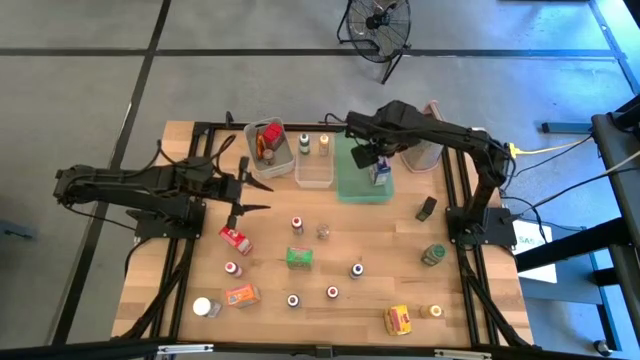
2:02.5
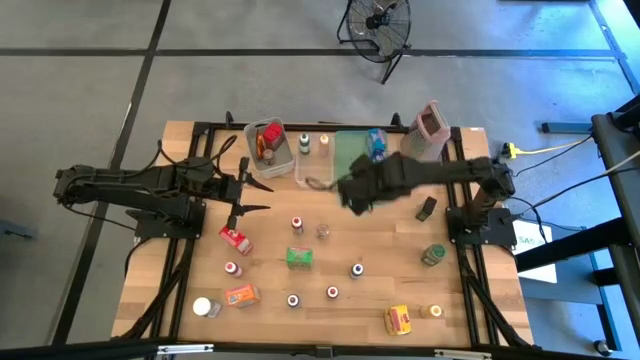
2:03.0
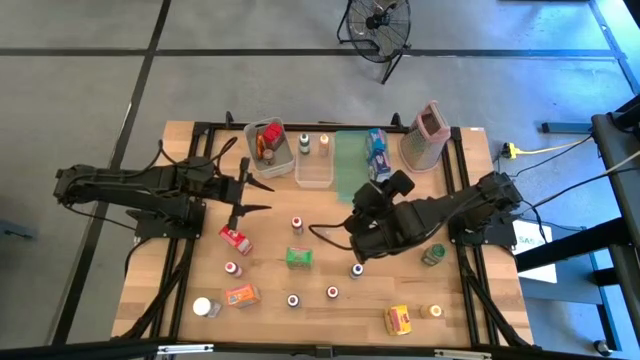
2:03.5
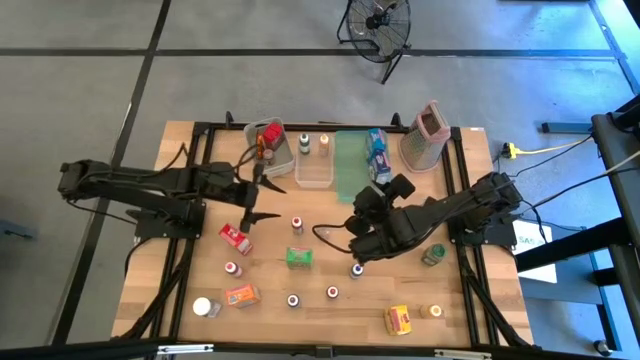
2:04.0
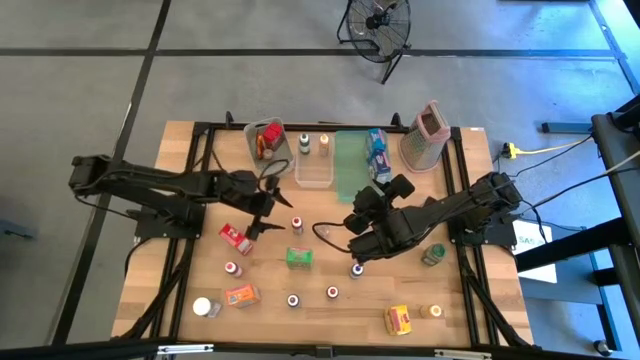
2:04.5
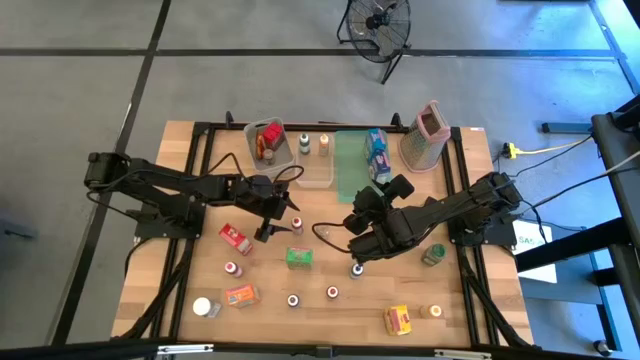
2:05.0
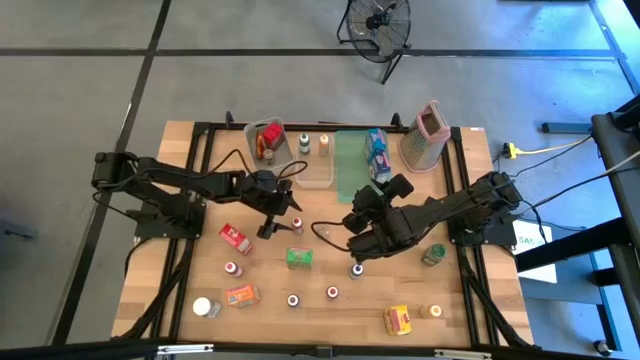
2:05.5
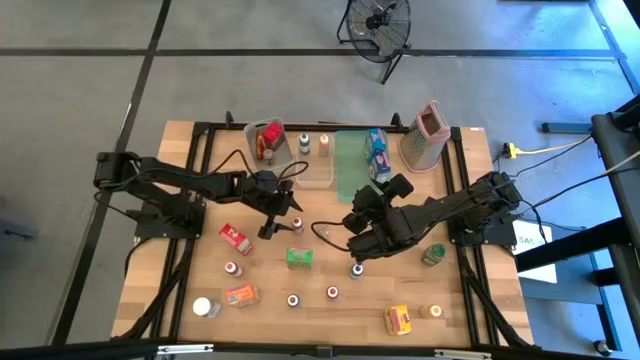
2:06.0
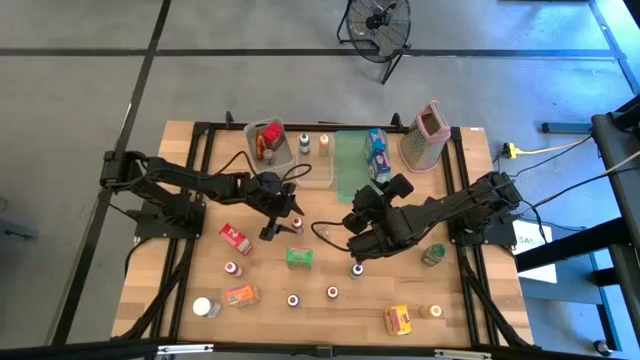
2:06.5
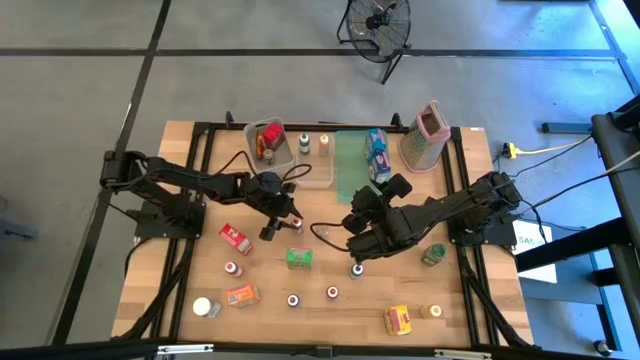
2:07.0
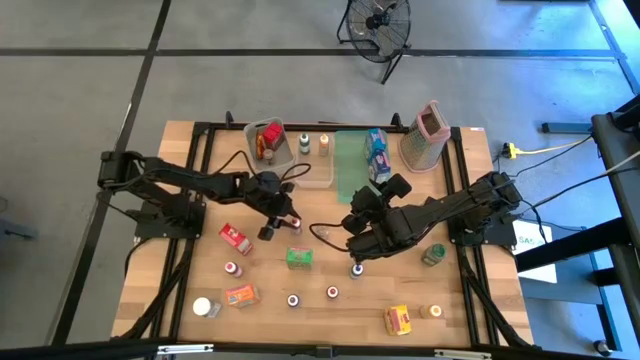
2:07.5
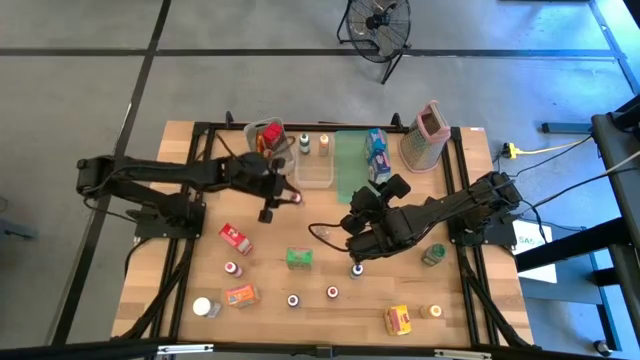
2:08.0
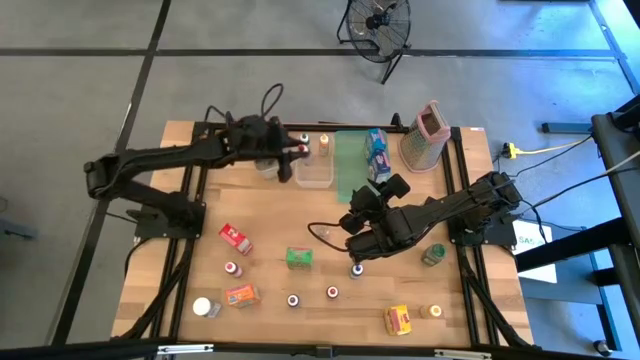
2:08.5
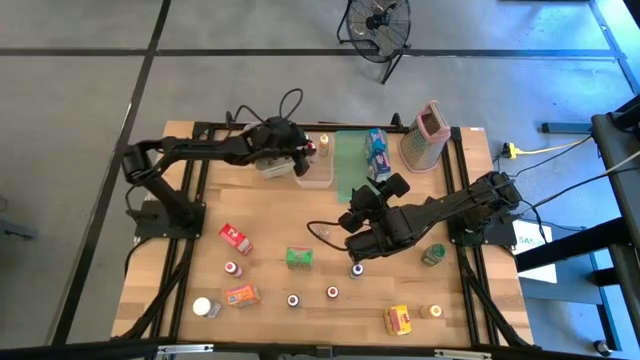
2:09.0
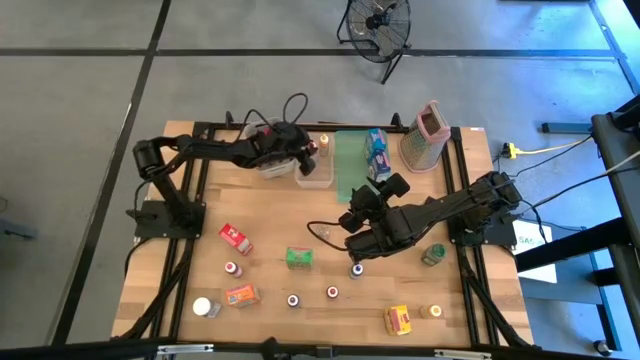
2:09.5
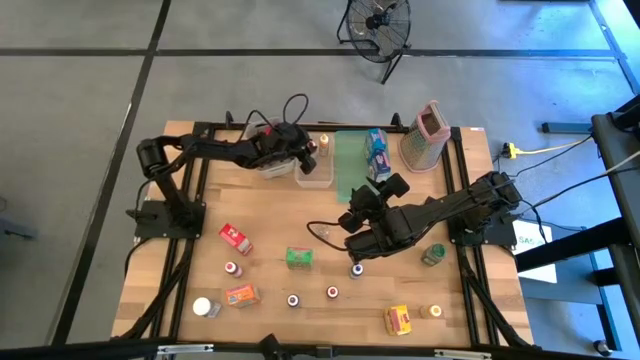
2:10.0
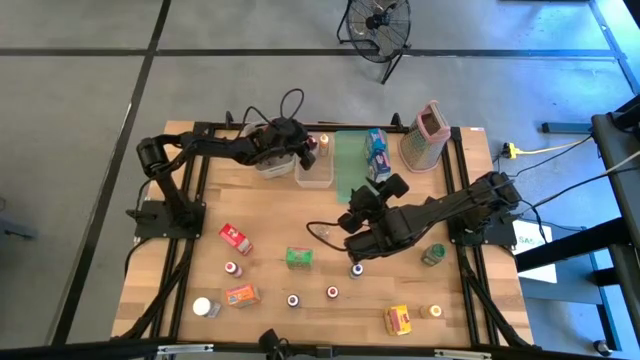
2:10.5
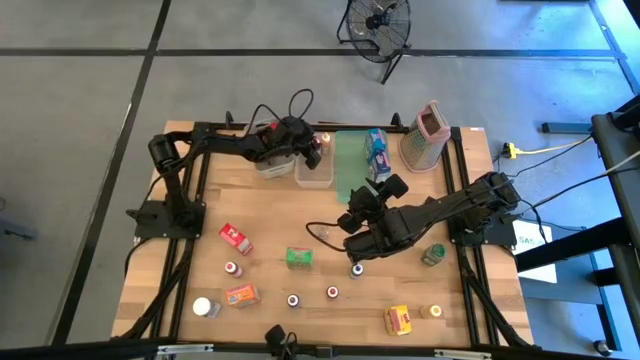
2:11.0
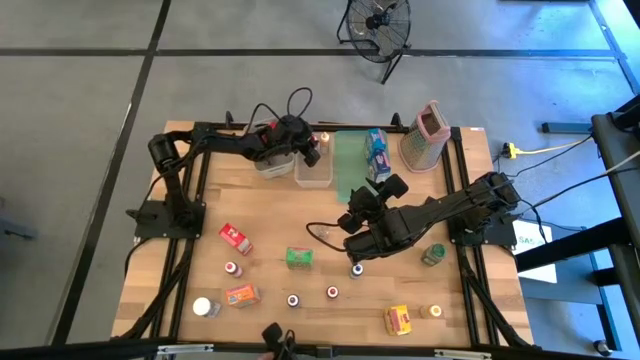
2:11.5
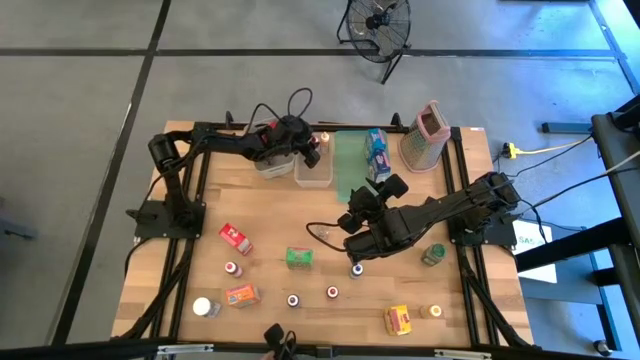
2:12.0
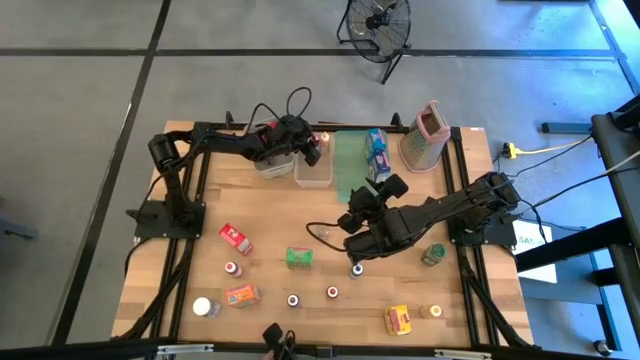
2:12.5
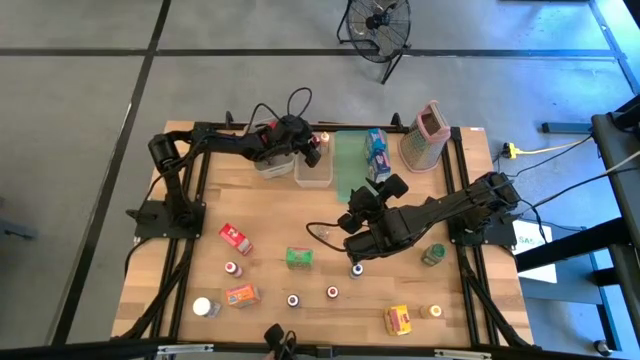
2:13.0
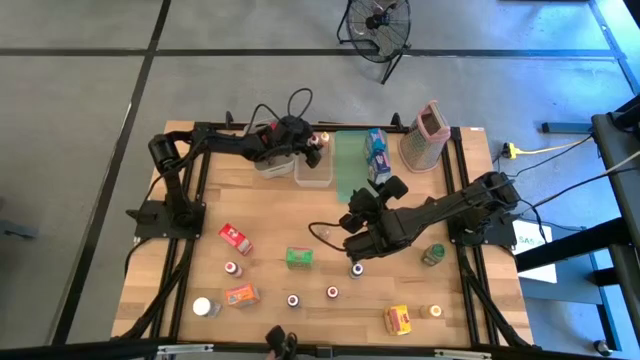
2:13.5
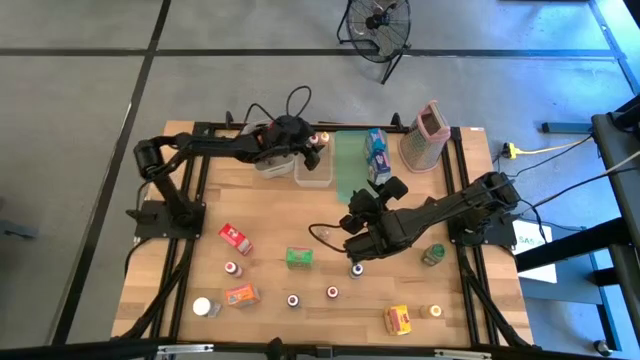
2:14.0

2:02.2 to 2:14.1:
Task: Pick & Place Kitchen Items
Put the top red food coloring bottle into the transparent bin

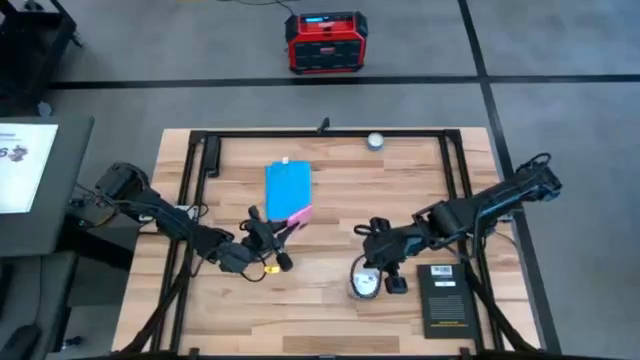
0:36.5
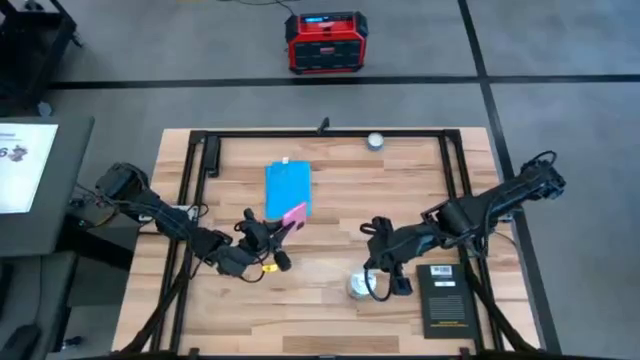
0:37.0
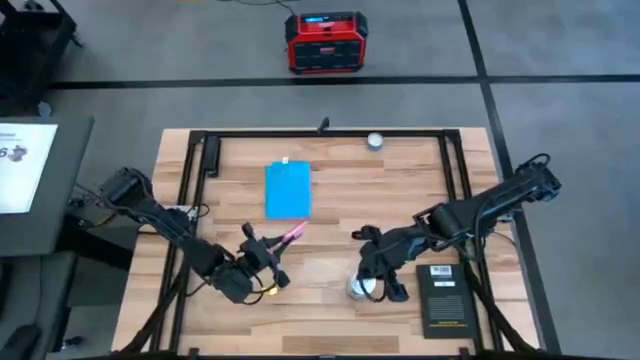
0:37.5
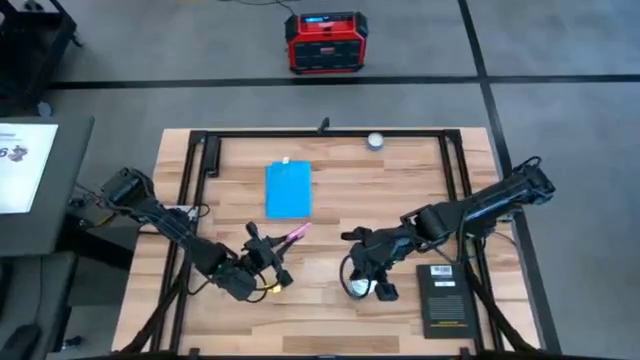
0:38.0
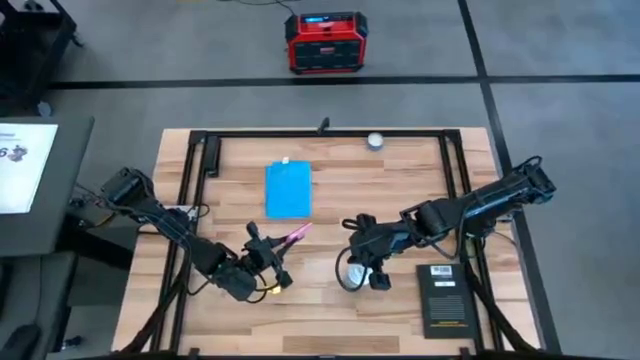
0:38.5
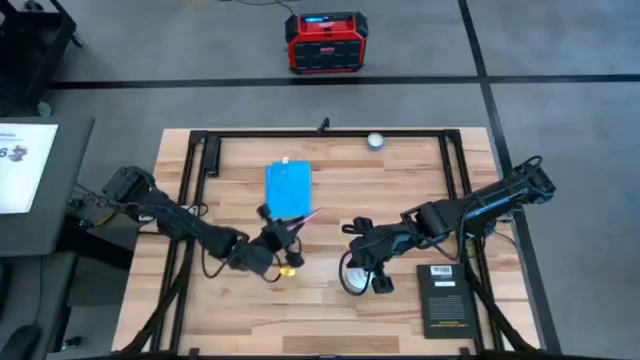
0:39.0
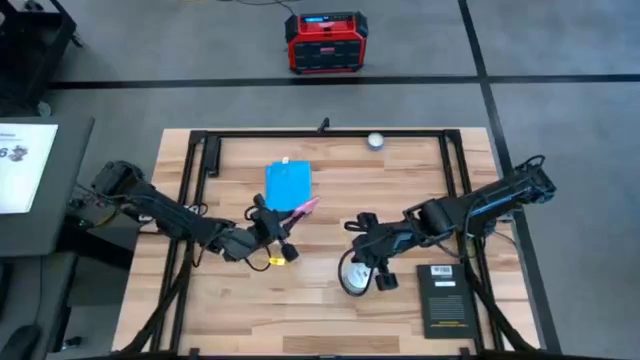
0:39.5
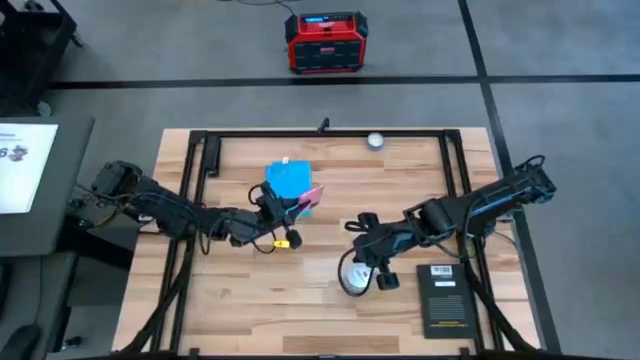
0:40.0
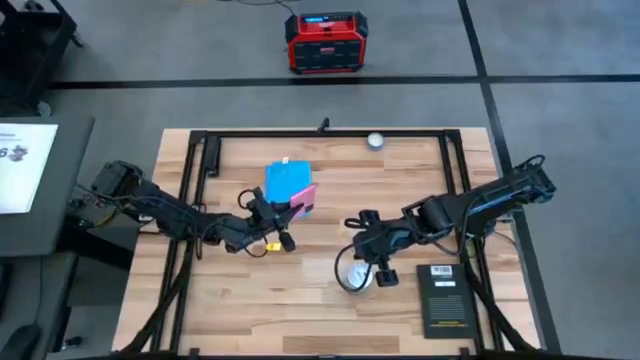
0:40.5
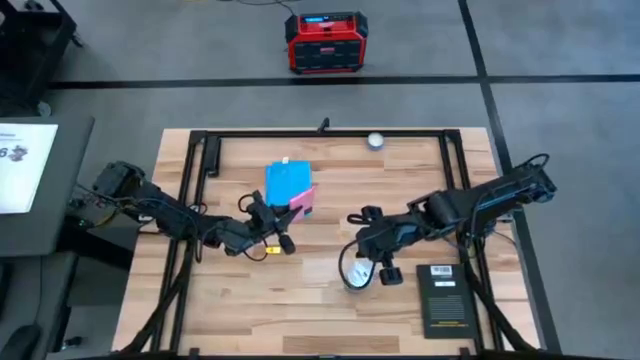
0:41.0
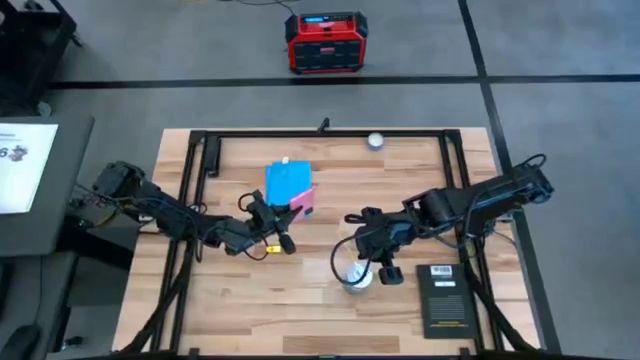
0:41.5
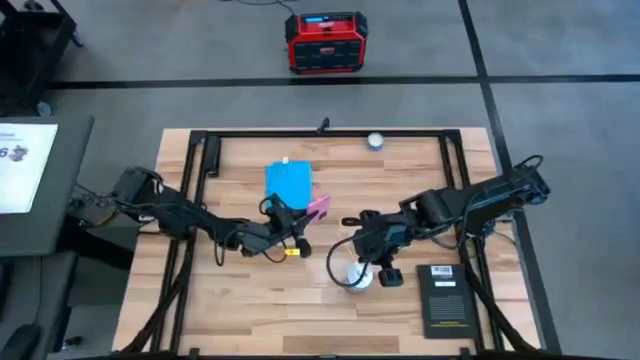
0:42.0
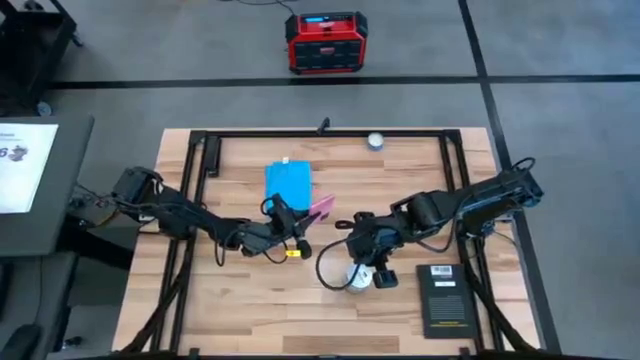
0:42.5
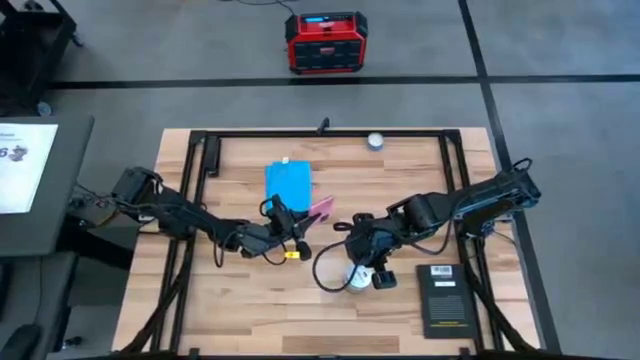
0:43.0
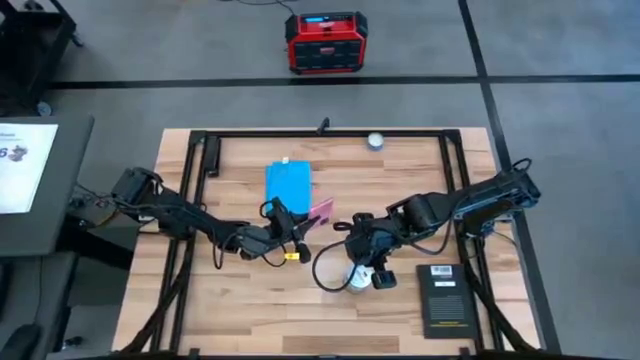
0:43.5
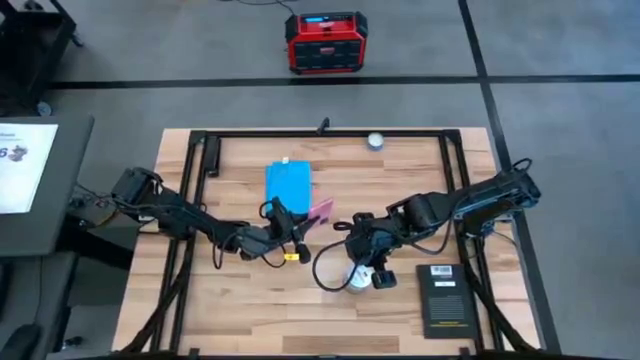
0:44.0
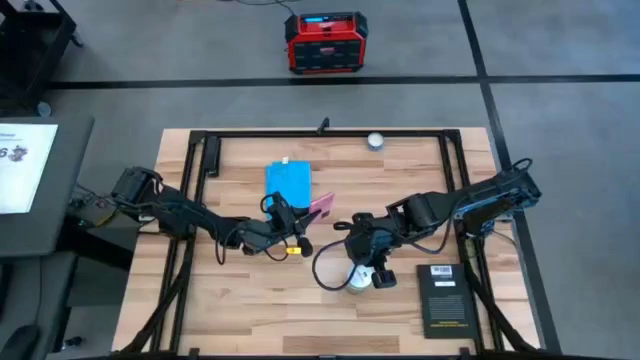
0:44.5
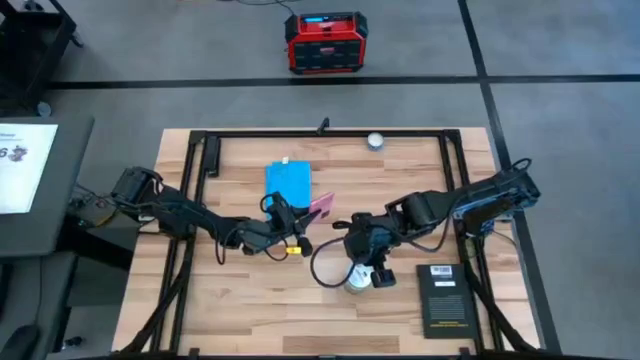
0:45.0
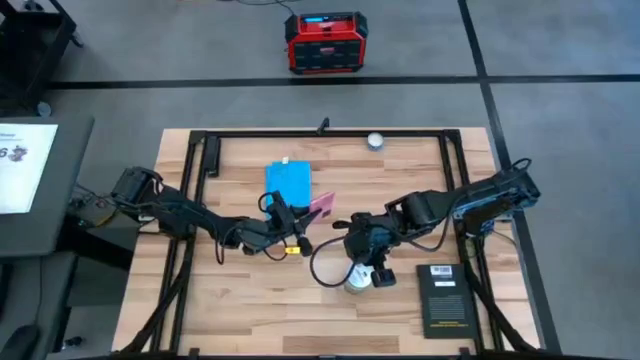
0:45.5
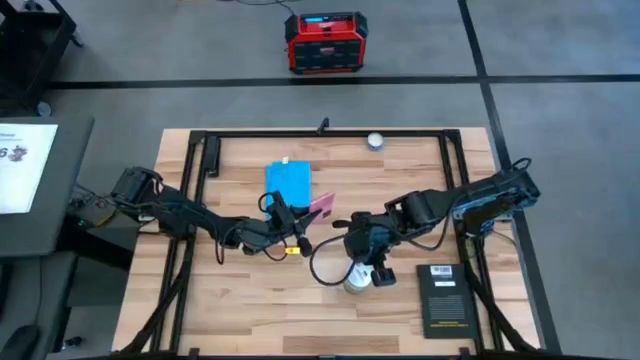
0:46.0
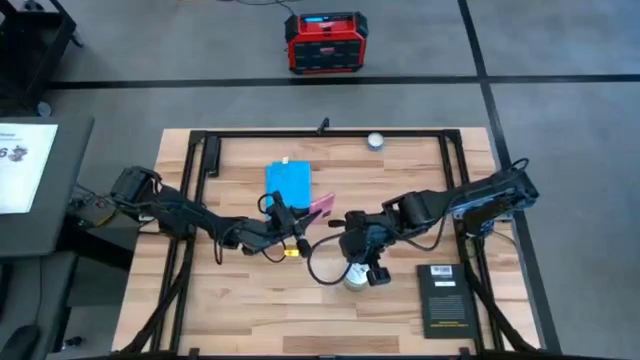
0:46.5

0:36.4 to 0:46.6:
Task: Apply microfiber cloth
Spray the device using the spray bottle
